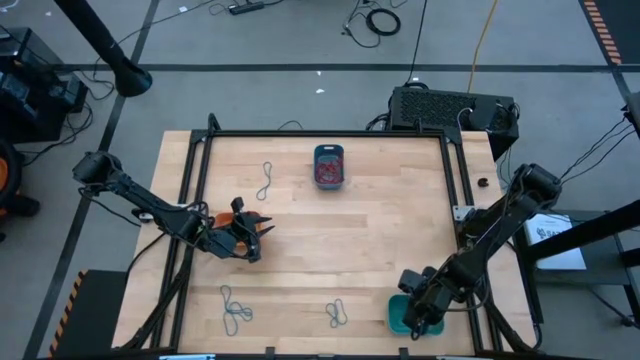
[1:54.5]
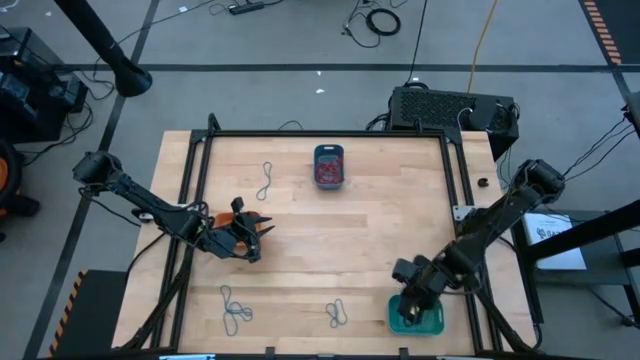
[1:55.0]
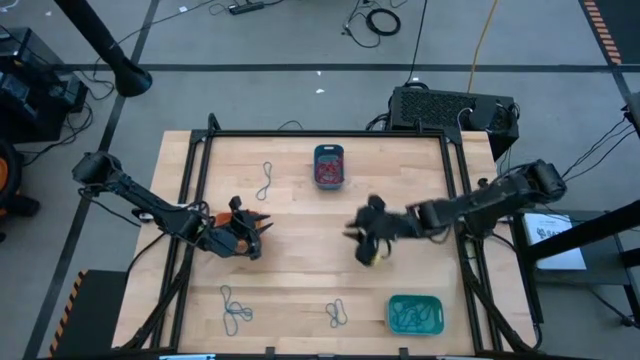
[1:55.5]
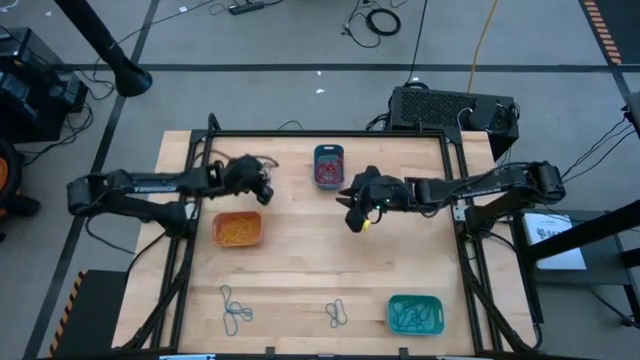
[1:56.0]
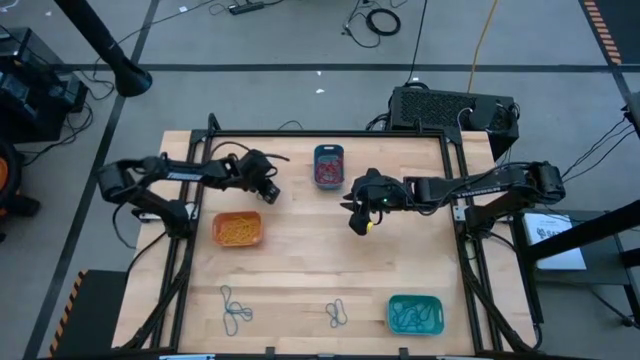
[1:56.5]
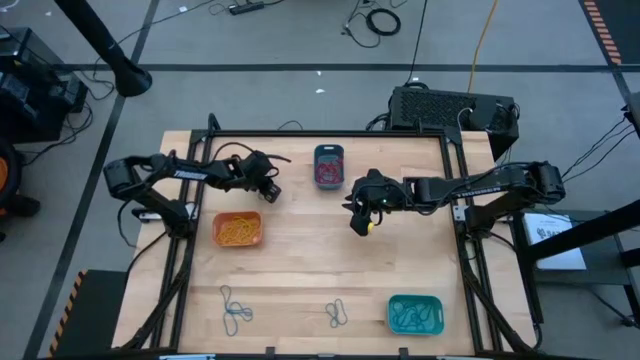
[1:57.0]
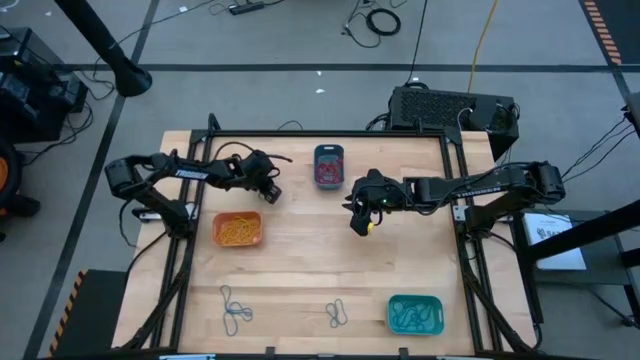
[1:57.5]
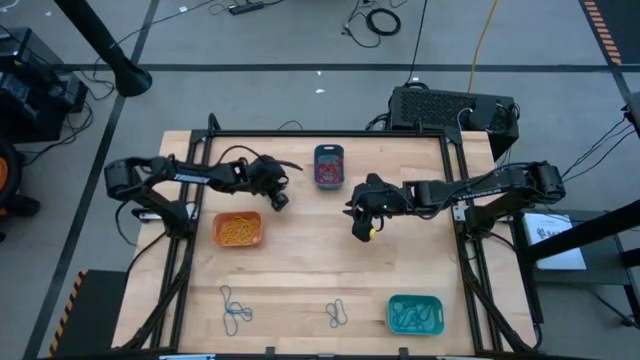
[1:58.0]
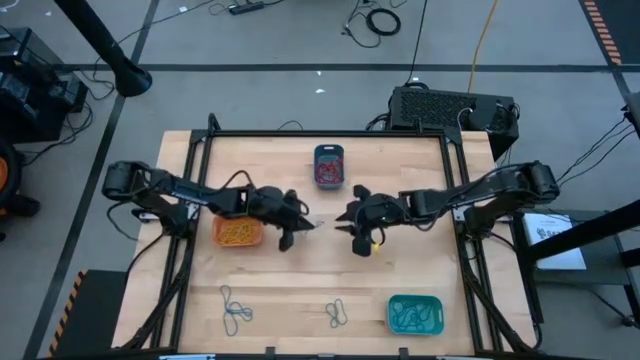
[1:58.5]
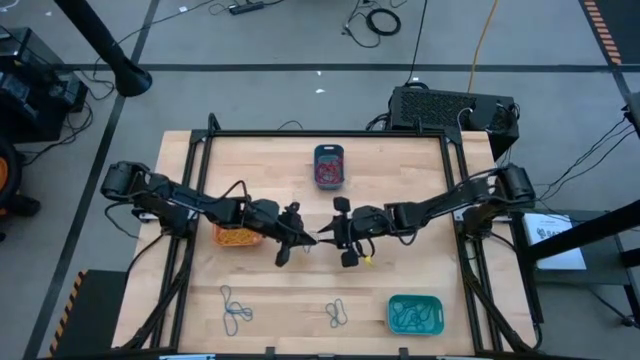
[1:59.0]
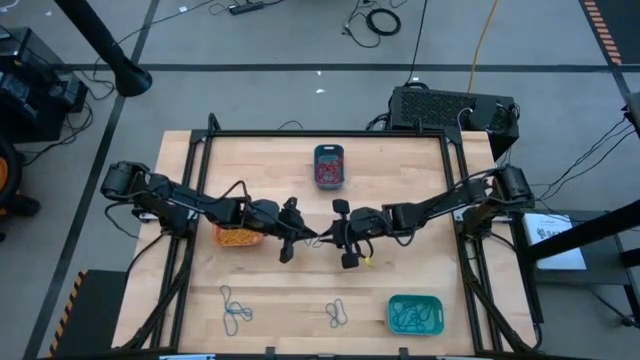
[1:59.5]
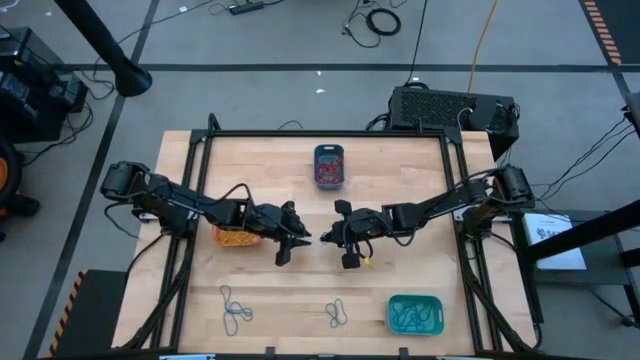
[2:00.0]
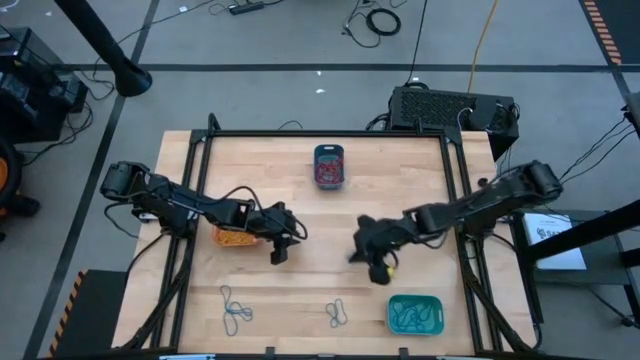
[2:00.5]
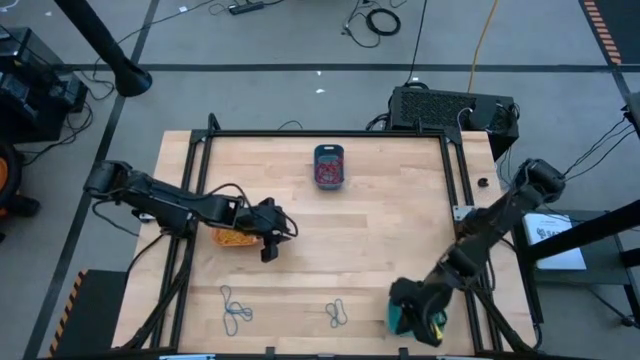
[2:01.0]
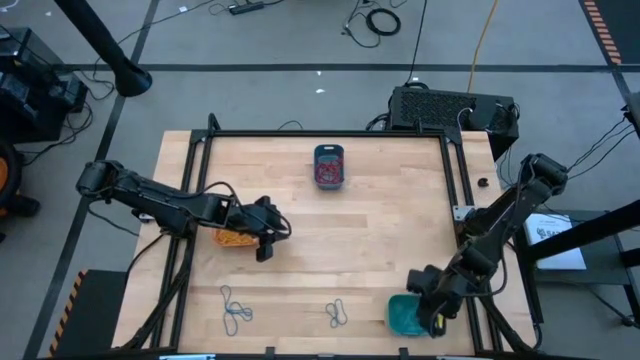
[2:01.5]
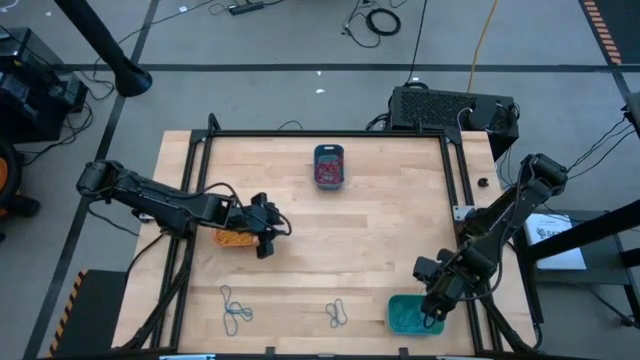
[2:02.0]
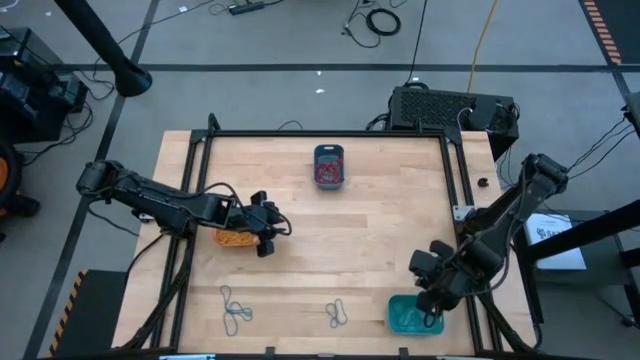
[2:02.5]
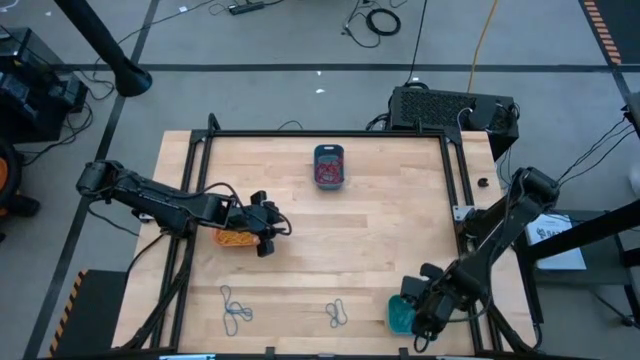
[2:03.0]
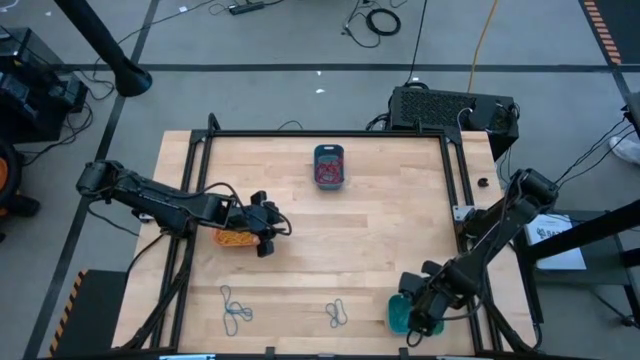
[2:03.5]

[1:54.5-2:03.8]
Task: Sort rubber bands into baskets
Put the top left blue rubber band into the light blue bin

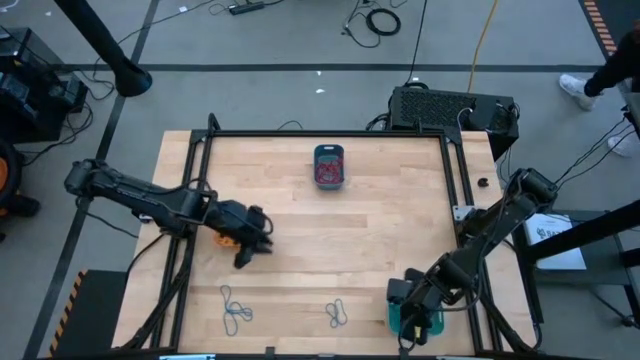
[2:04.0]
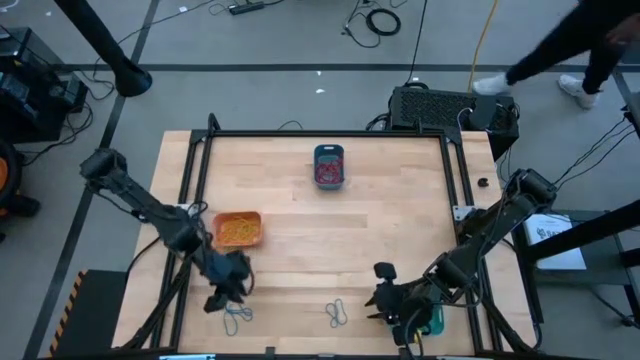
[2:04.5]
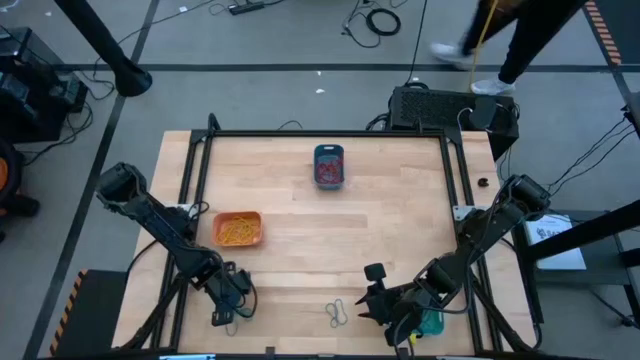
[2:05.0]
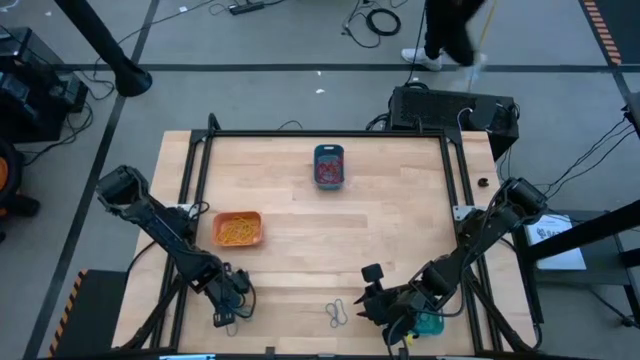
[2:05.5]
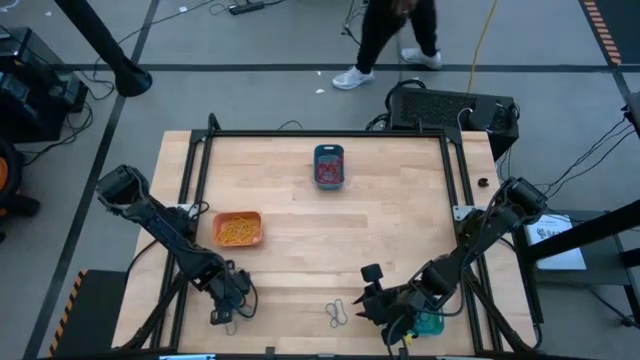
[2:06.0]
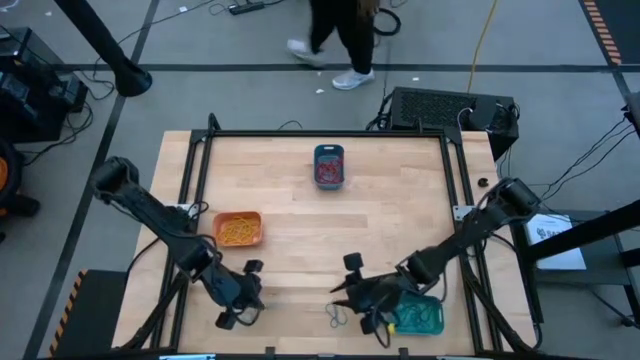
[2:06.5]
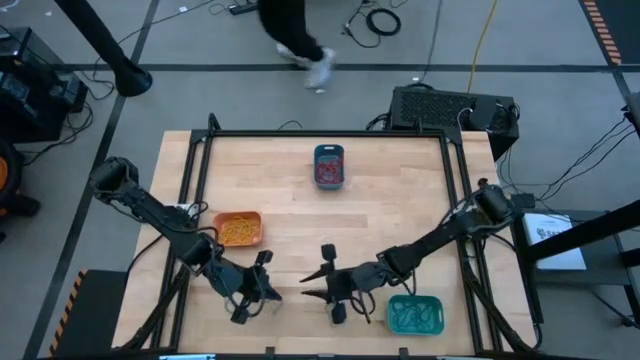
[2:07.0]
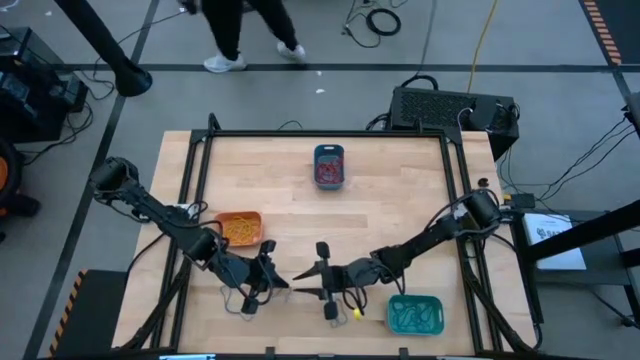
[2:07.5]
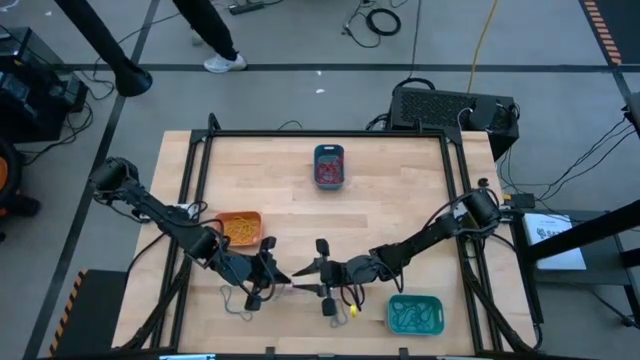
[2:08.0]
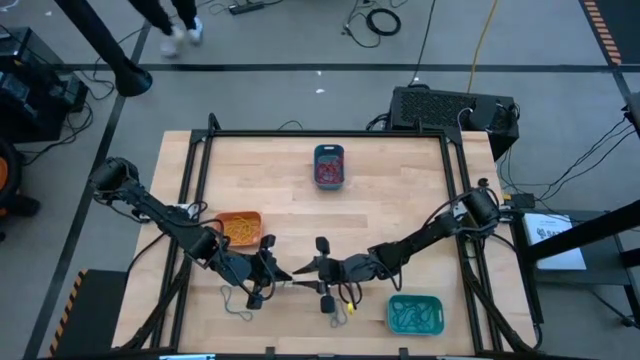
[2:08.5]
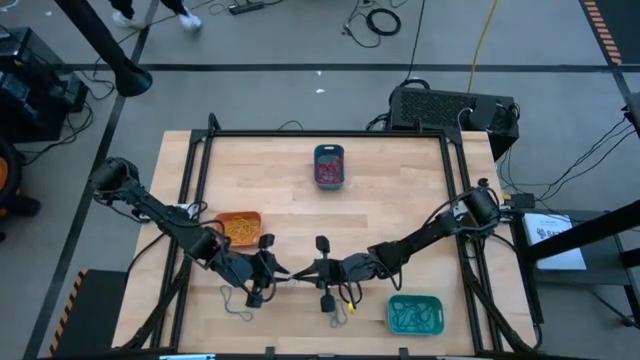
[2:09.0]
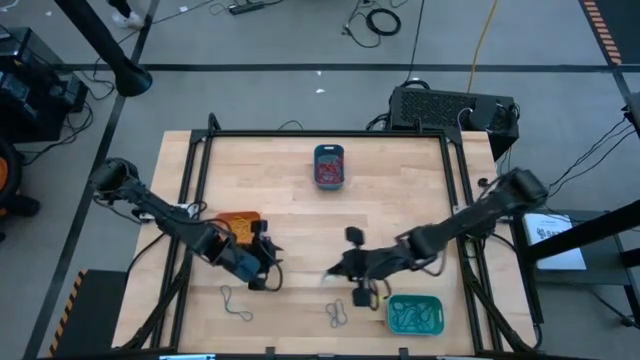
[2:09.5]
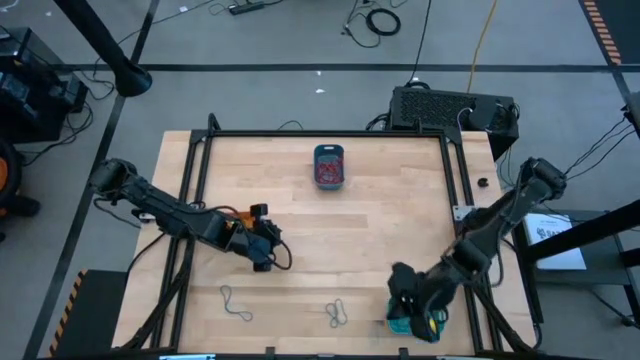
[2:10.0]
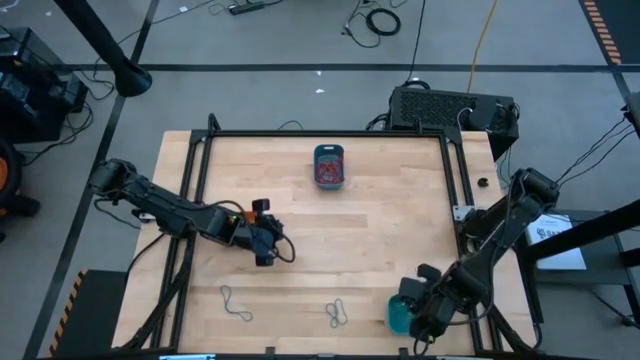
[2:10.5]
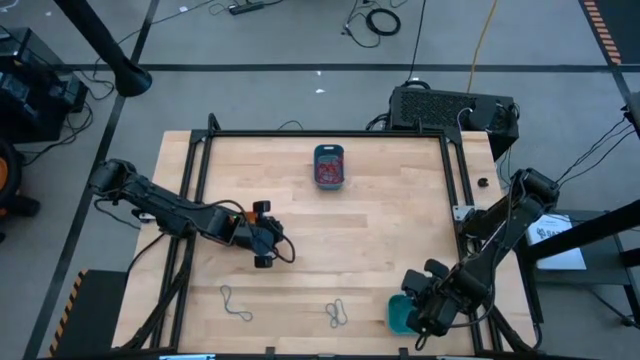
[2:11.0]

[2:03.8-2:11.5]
Put the bottom left blue rubber band into the light blue bin

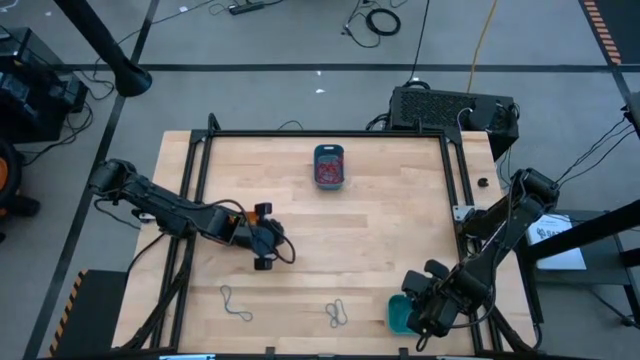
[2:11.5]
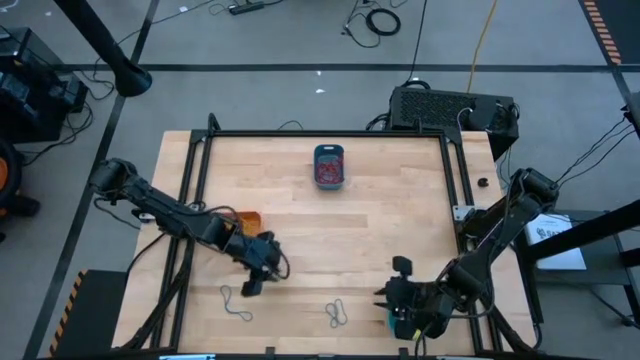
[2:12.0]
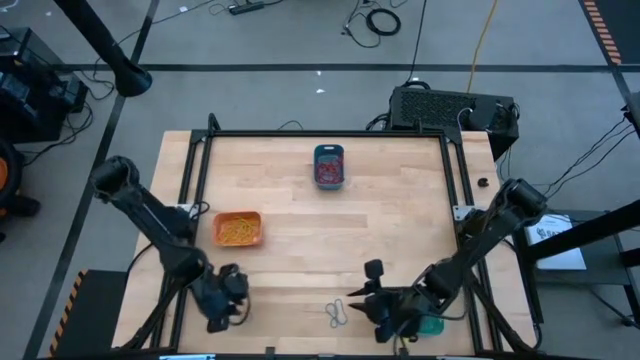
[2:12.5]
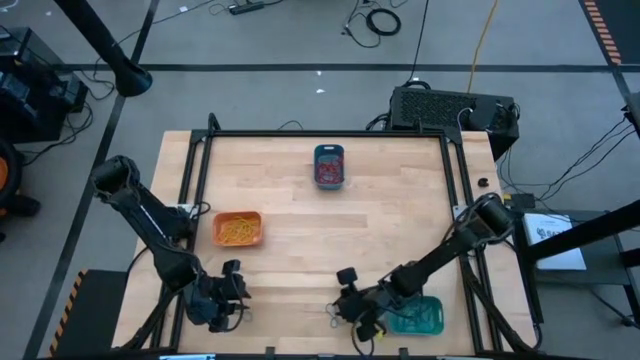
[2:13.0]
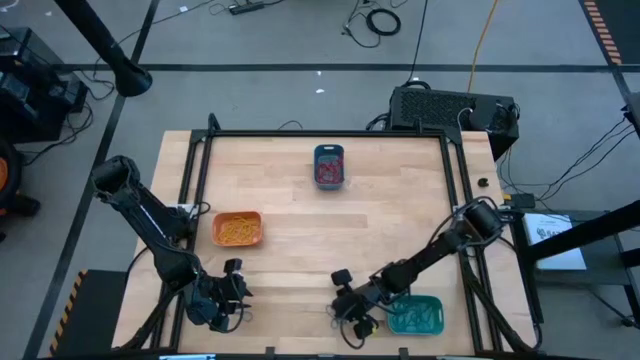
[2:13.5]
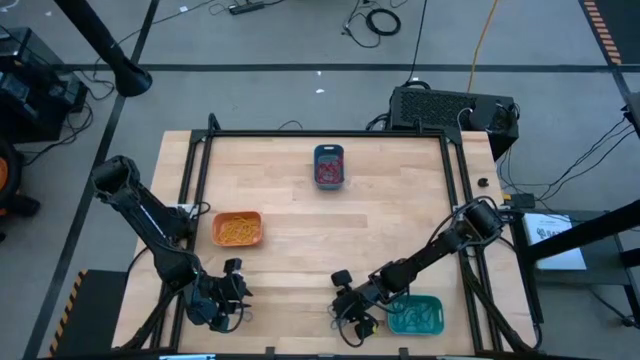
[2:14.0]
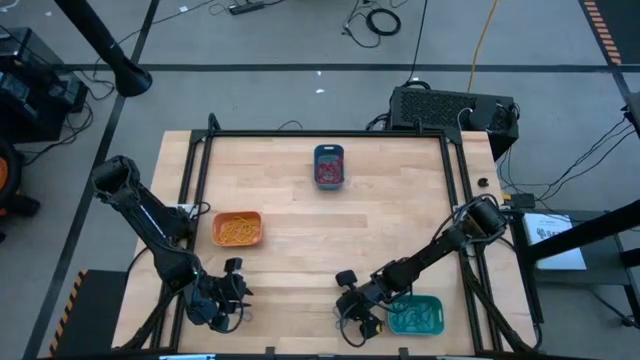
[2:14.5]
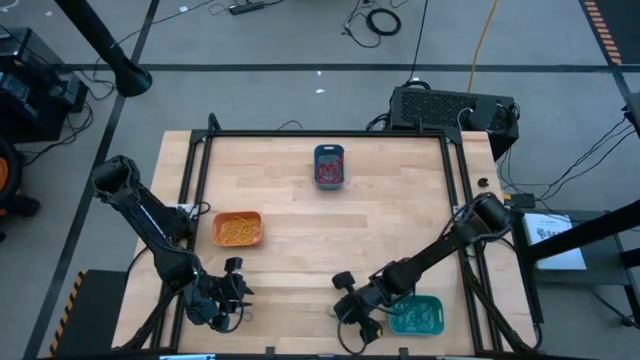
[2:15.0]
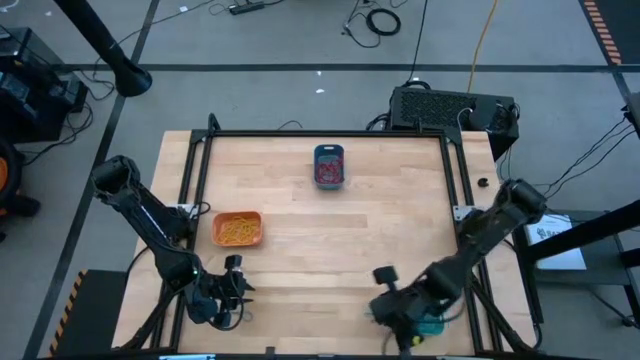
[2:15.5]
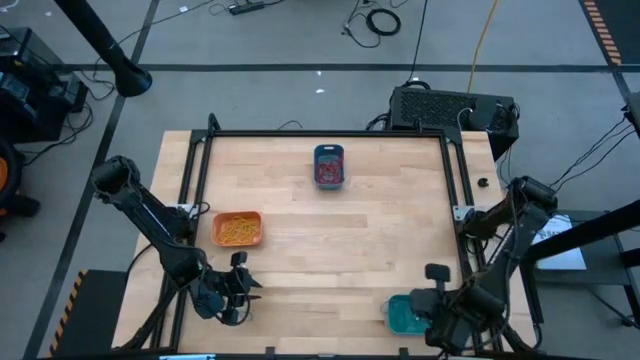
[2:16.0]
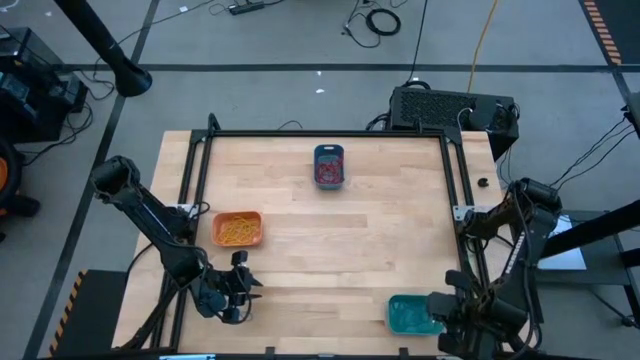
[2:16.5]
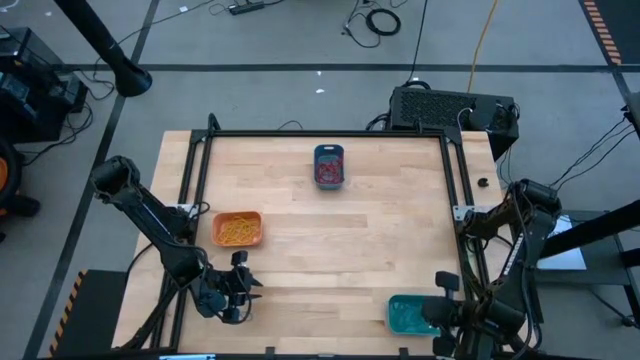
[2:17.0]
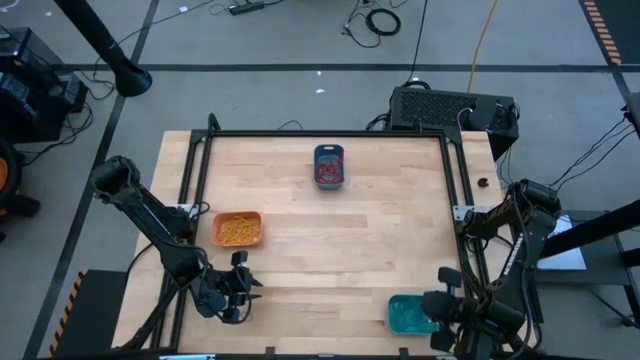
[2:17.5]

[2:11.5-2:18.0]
Put the right blue rubber band into the light blue bin
